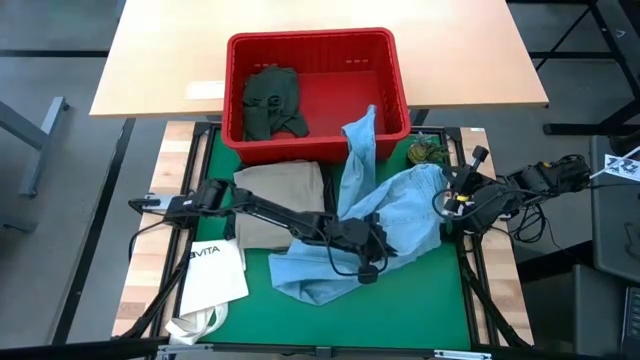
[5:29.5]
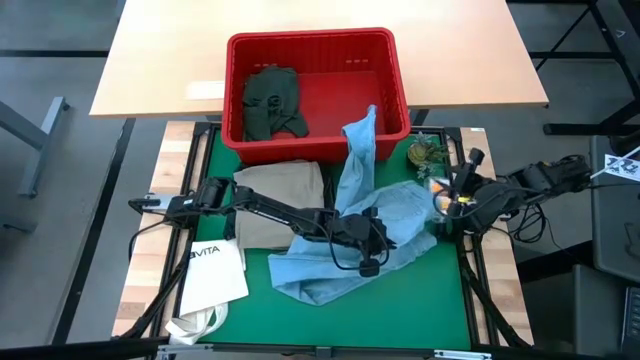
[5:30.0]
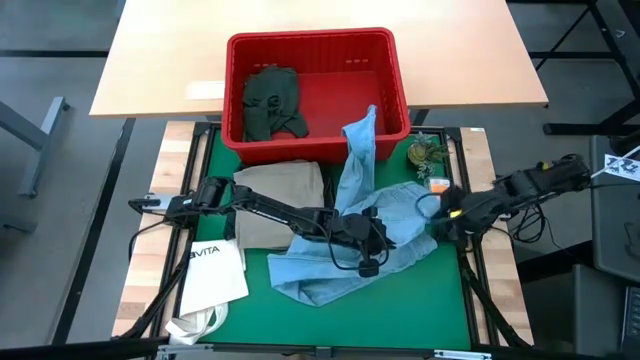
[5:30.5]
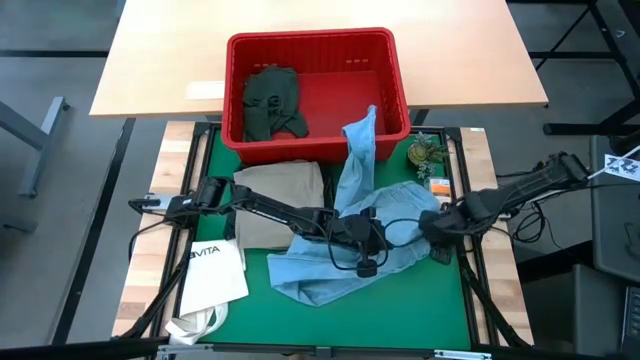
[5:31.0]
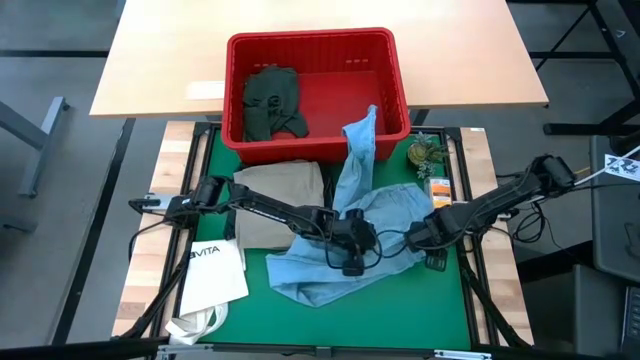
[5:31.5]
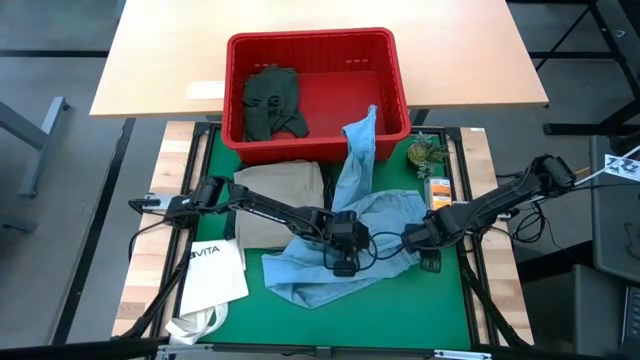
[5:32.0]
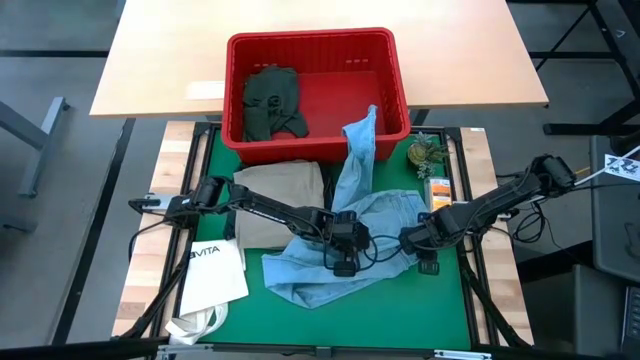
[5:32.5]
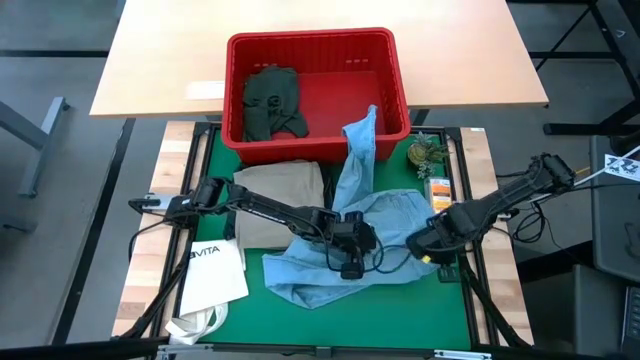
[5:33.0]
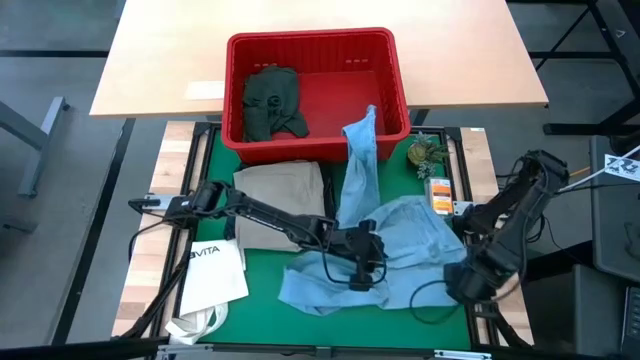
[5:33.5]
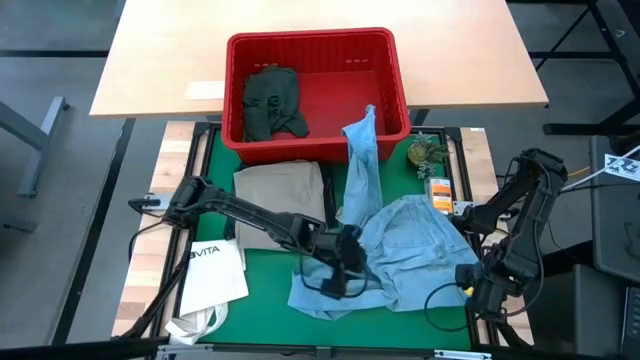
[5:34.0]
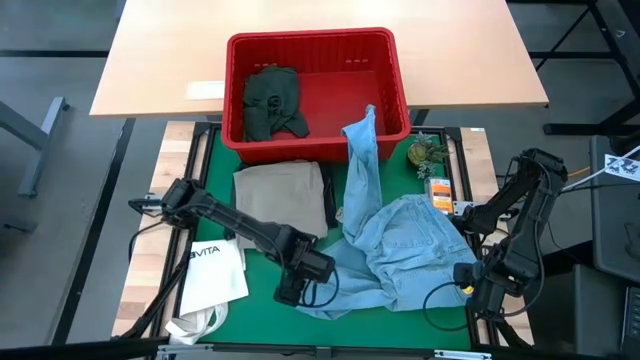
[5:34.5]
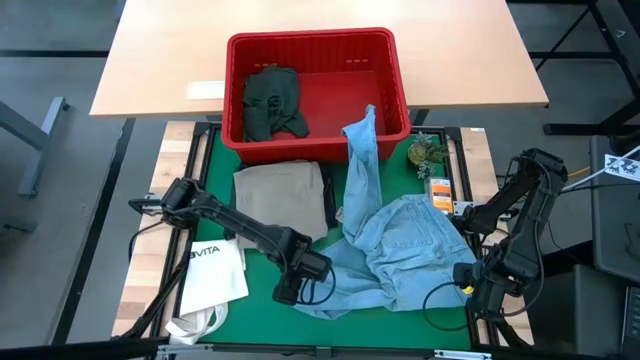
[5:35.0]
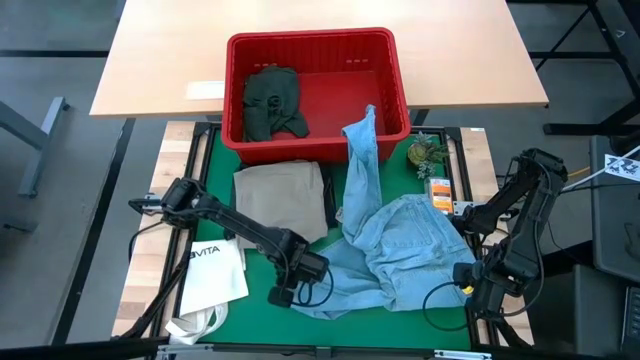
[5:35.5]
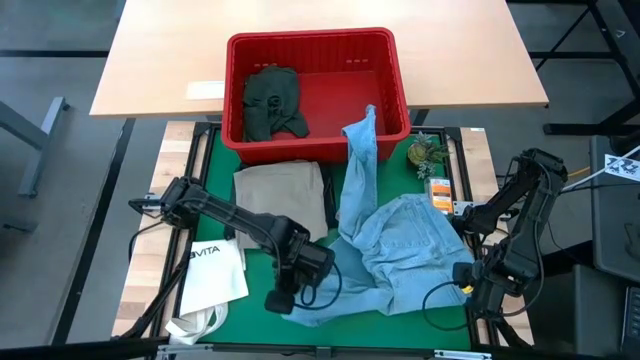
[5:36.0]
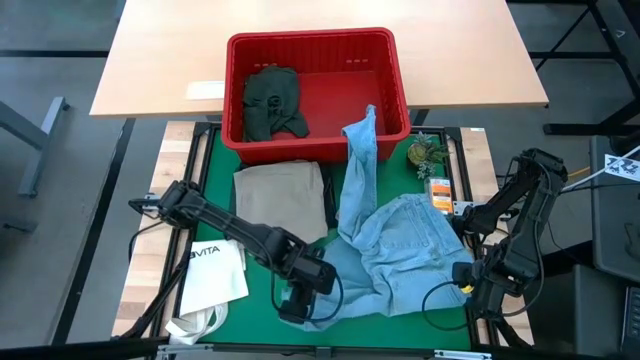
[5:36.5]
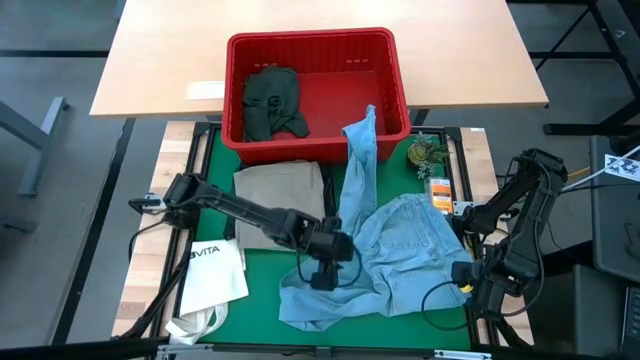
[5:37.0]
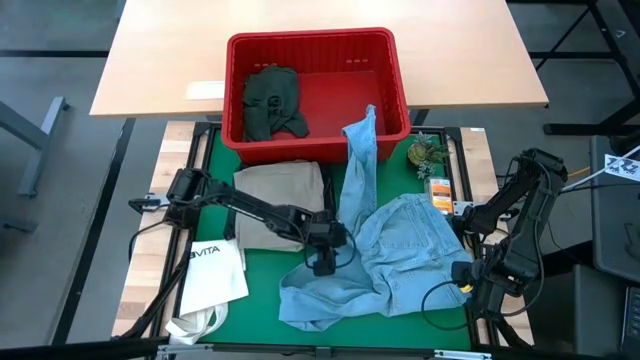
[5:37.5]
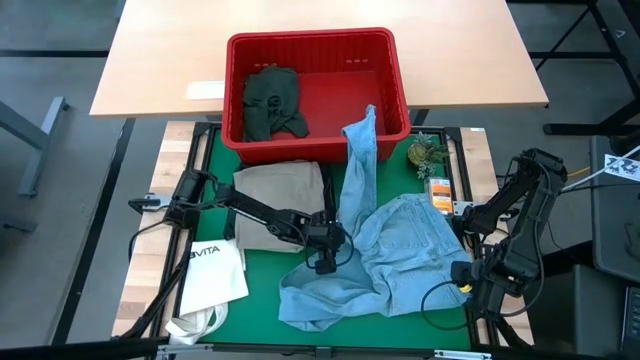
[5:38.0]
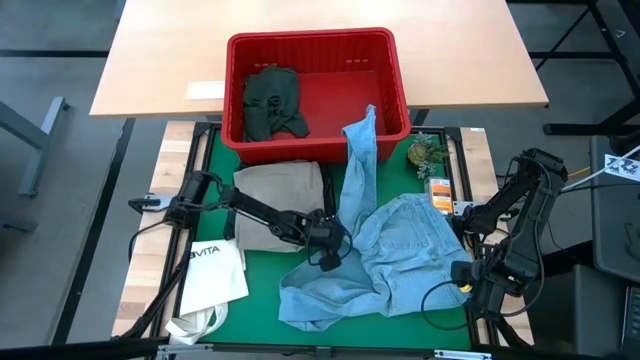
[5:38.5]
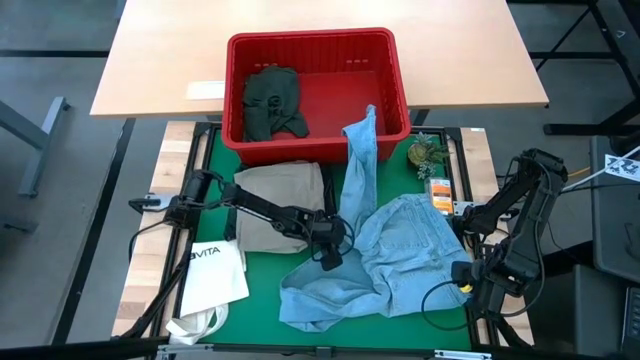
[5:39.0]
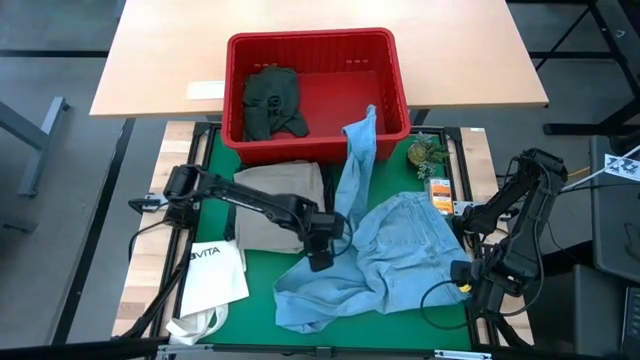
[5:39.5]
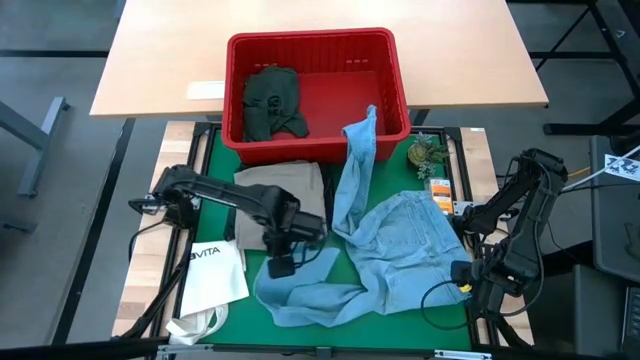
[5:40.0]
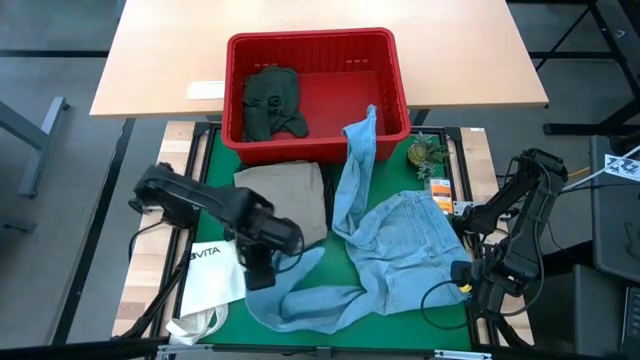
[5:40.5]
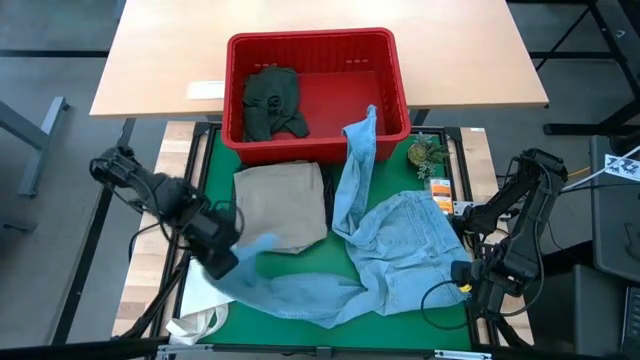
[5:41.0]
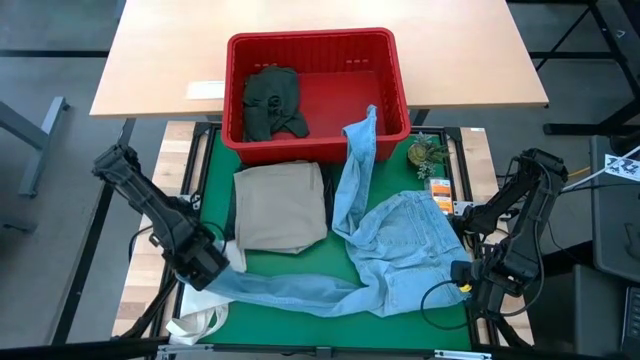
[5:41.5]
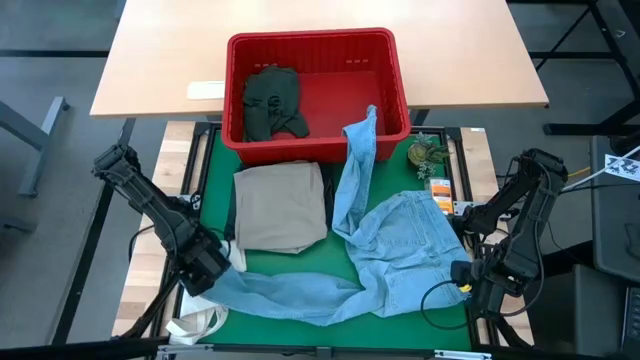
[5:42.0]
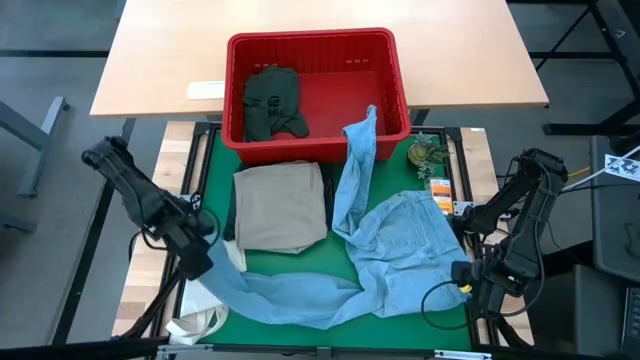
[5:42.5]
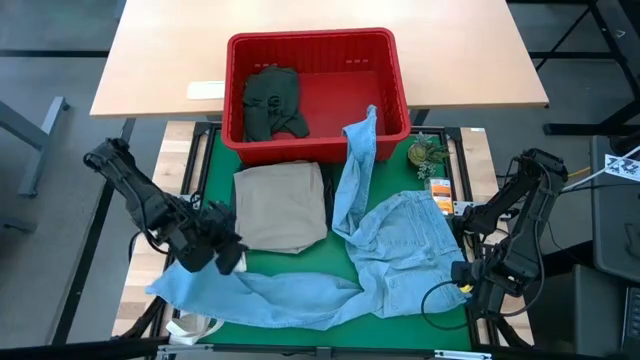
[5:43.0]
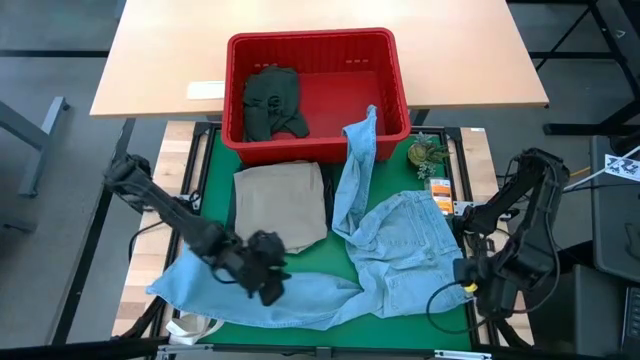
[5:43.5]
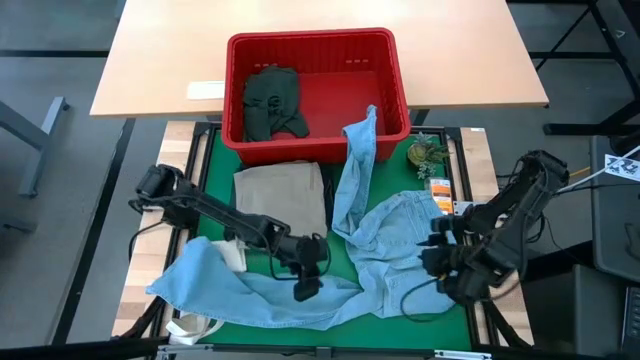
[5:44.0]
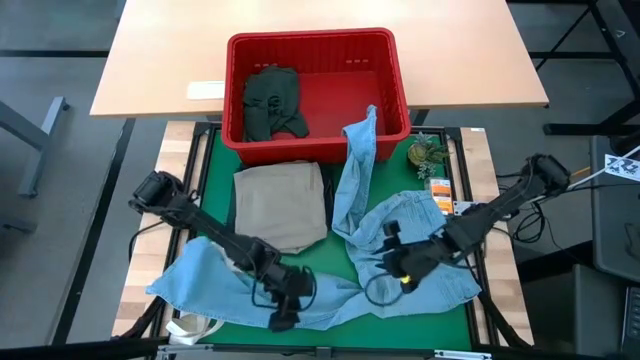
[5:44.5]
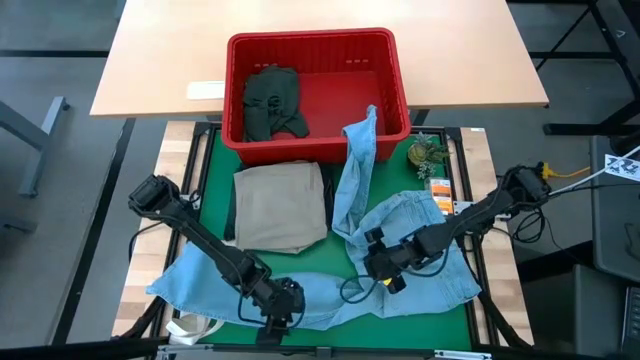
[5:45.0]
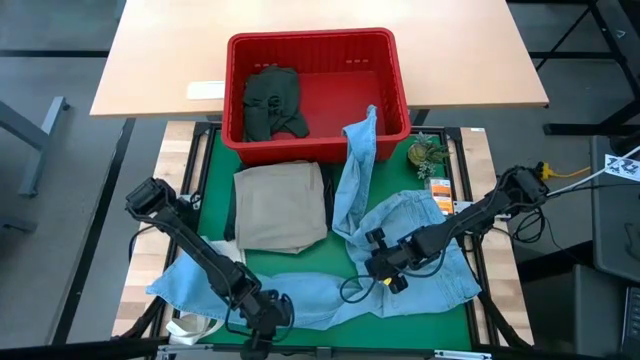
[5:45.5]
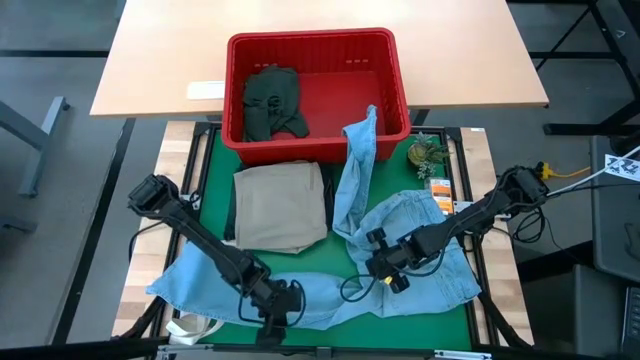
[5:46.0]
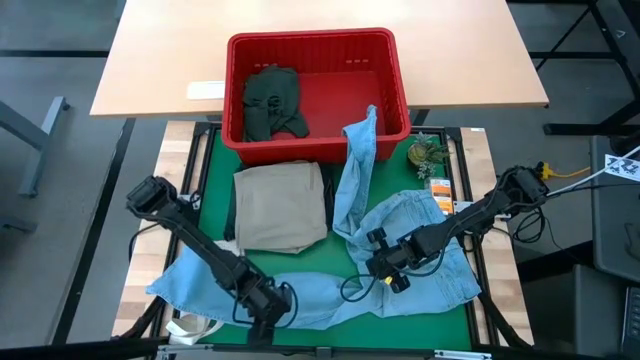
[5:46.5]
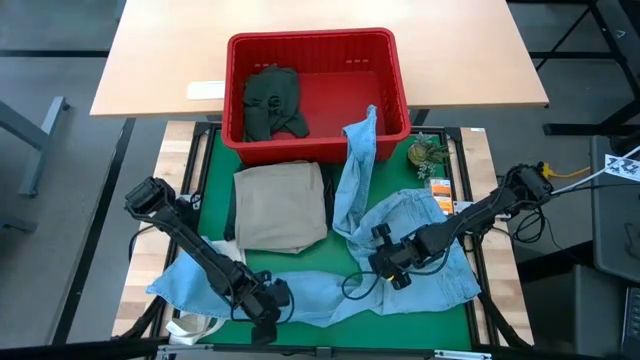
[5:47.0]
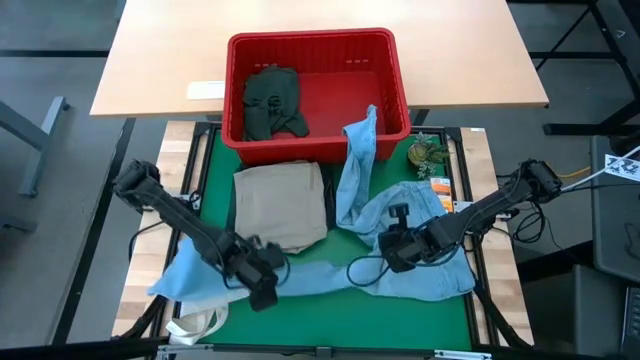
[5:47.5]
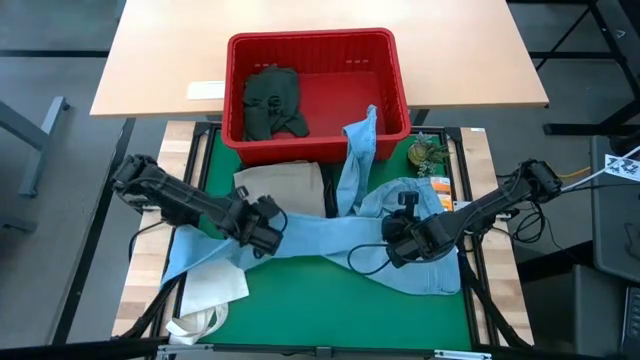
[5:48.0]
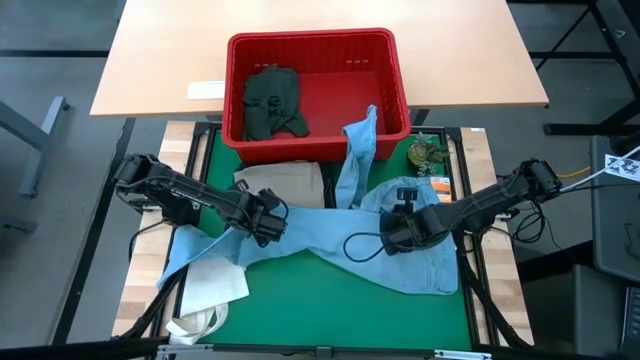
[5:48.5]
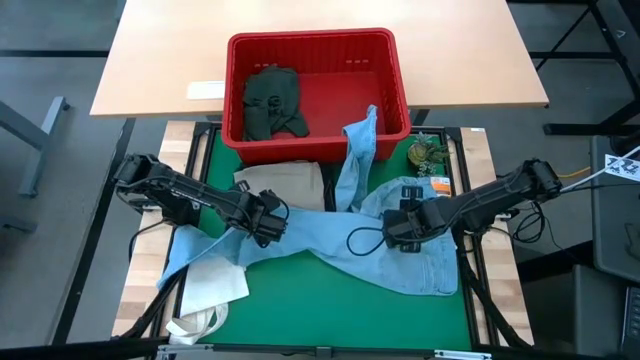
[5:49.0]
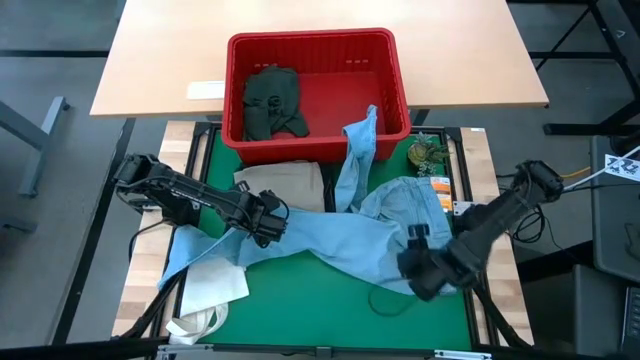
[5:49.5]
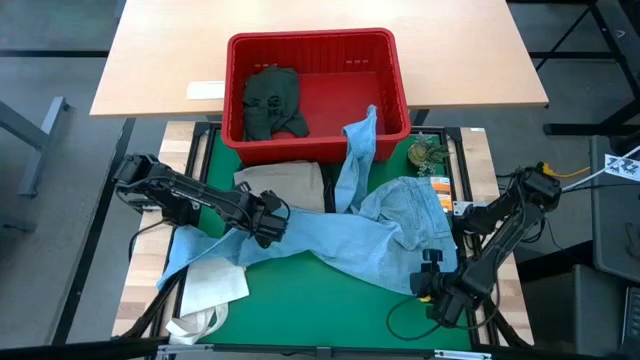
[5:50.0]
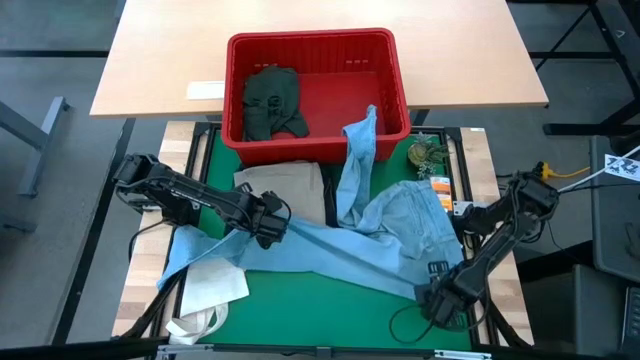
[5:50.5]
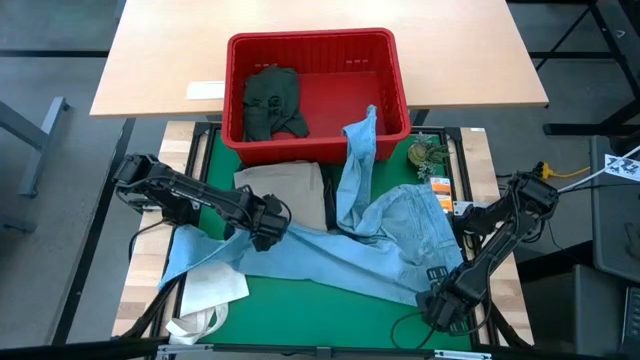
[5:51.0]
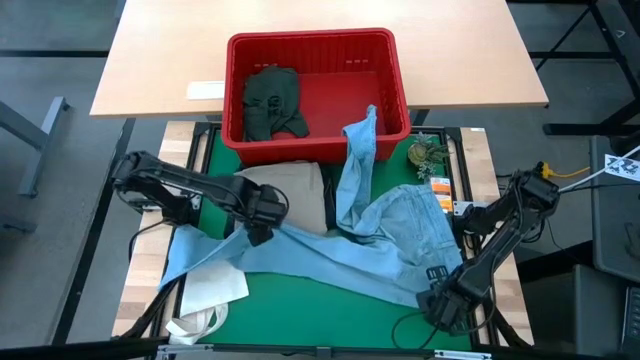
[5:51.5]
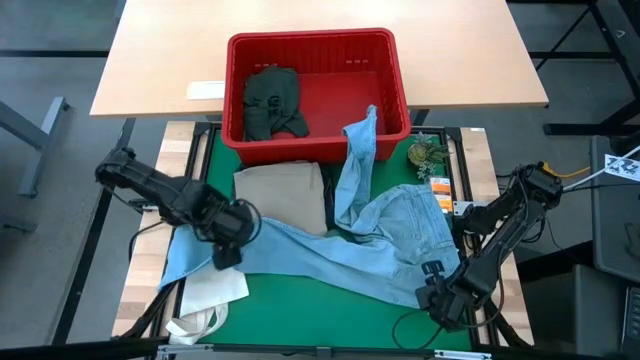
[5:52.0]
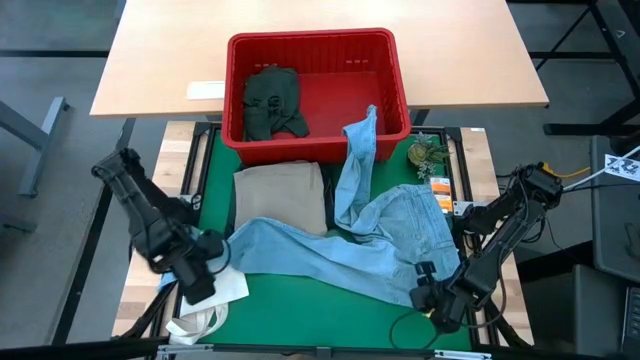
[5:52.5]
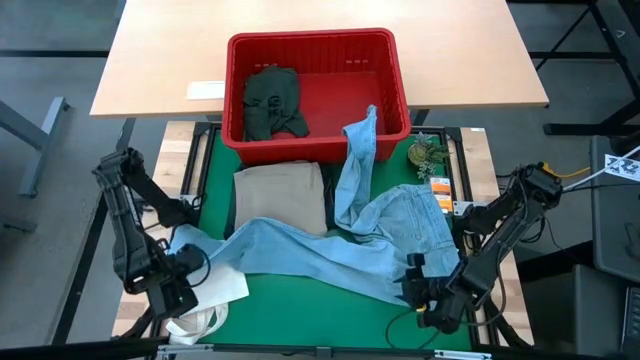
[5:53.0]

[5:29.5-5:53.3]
Task: Fold Laundry from Bin
Fold the light blue pants
